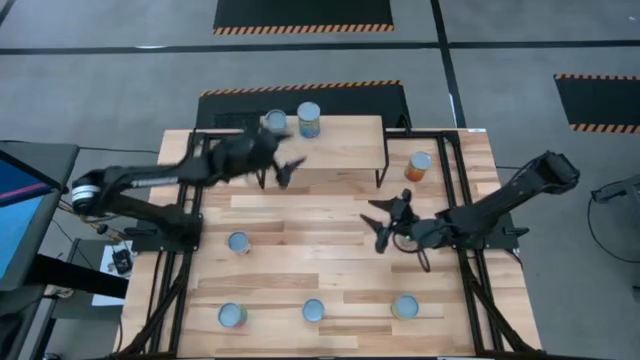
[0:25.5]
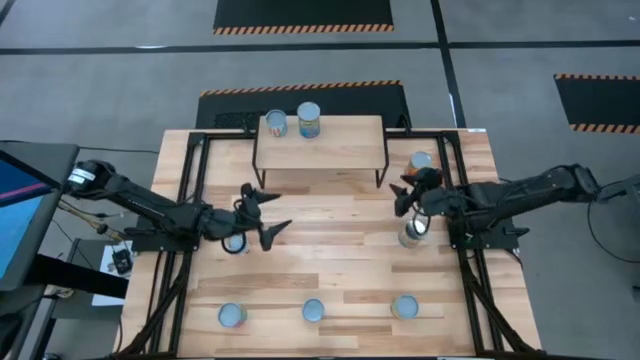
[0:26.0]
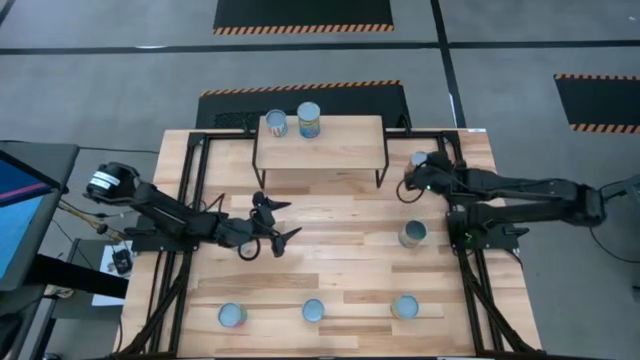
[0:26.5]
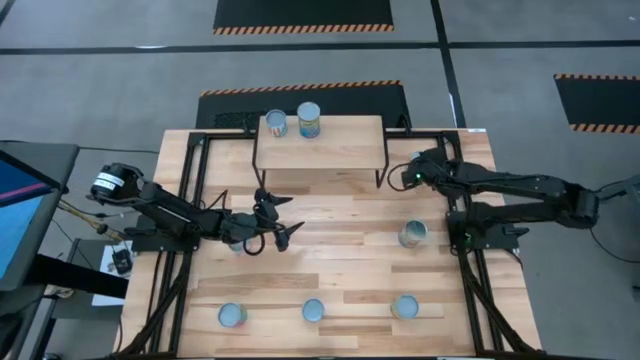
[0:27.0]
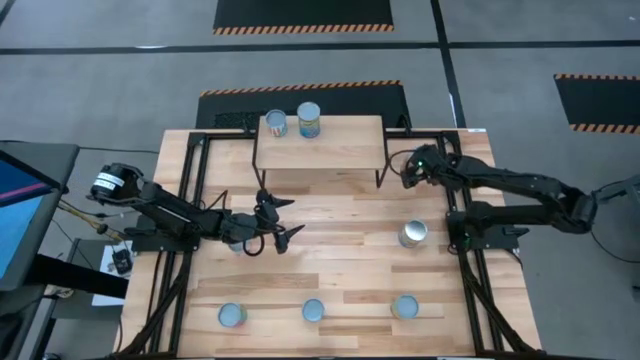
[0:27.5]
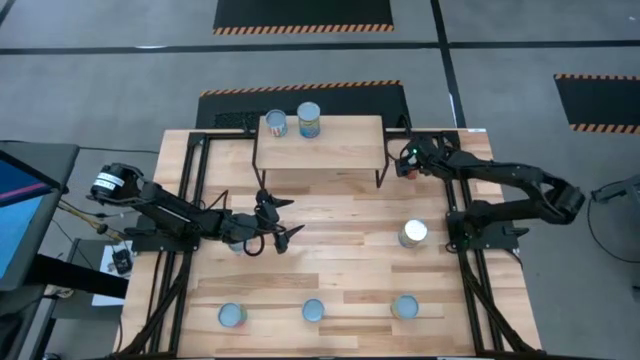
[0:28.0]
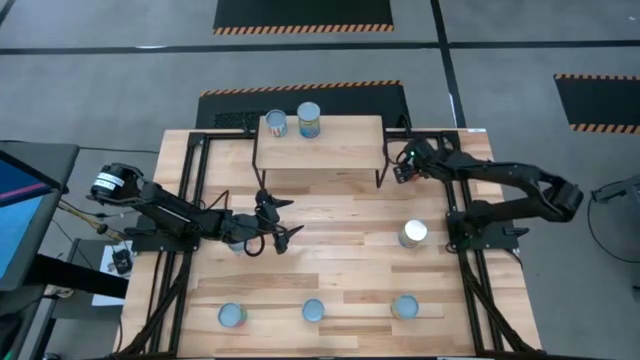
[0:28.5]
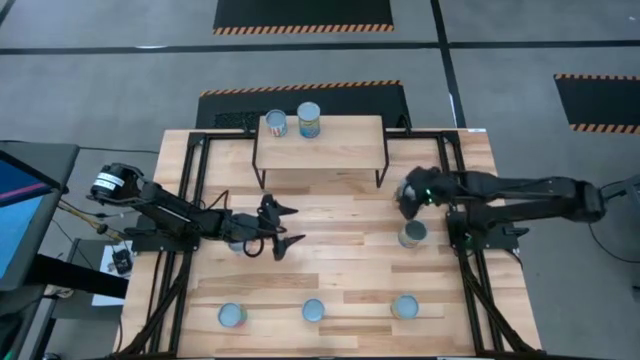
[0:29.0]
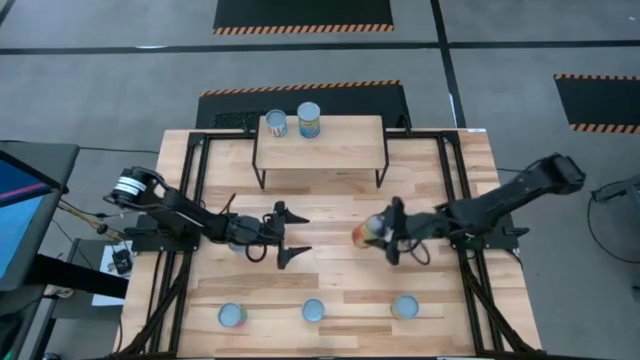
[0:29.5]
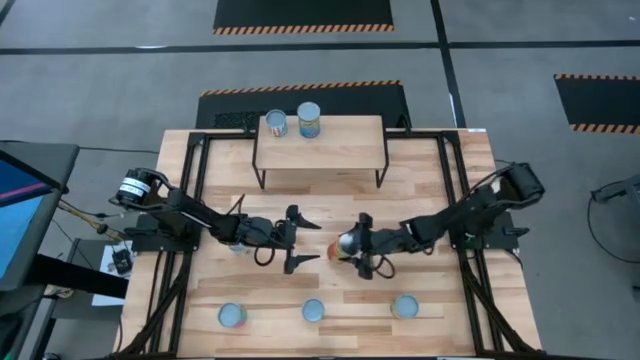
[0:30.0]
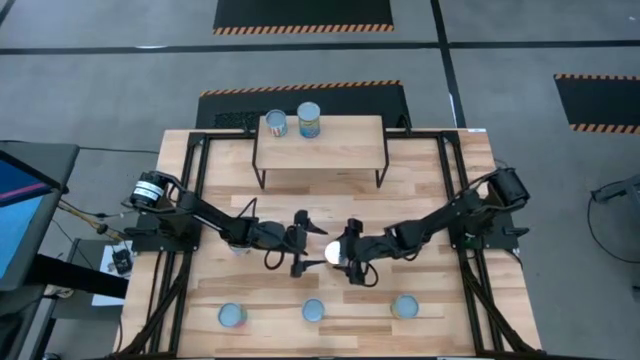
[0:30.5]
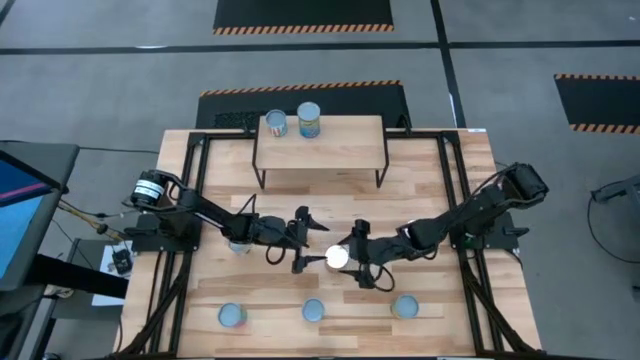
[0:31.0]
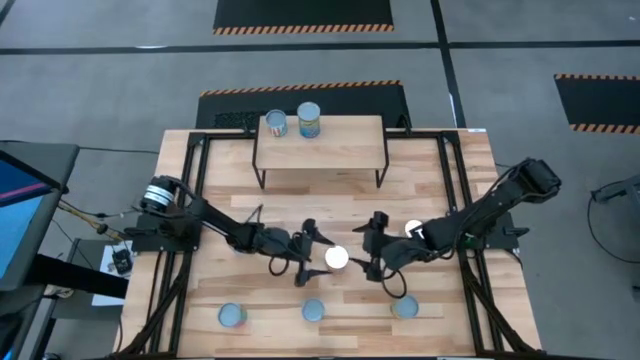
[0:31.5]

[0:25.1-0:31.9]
Task: Pick and place cans onto a shelf
Put the canned pineapple on the shelf

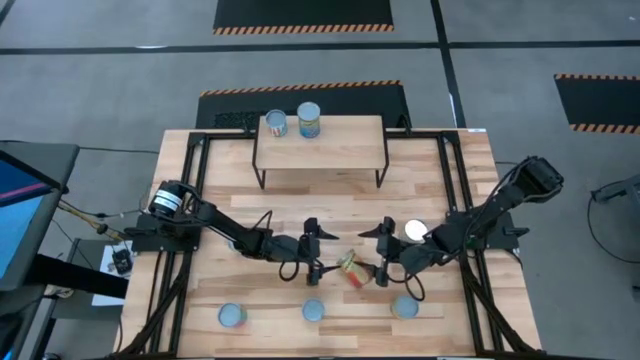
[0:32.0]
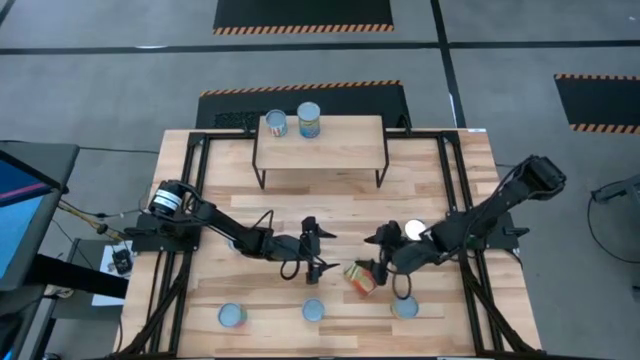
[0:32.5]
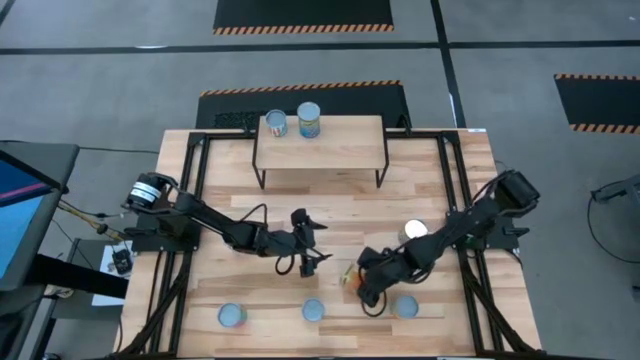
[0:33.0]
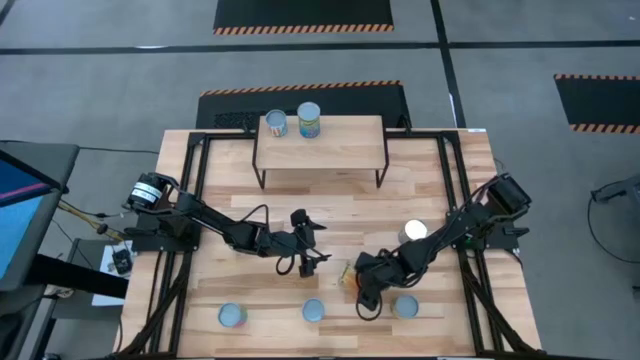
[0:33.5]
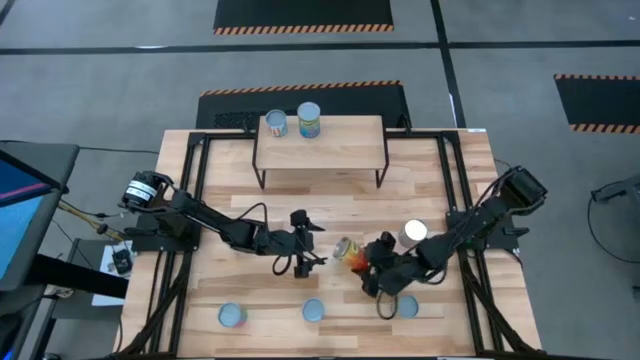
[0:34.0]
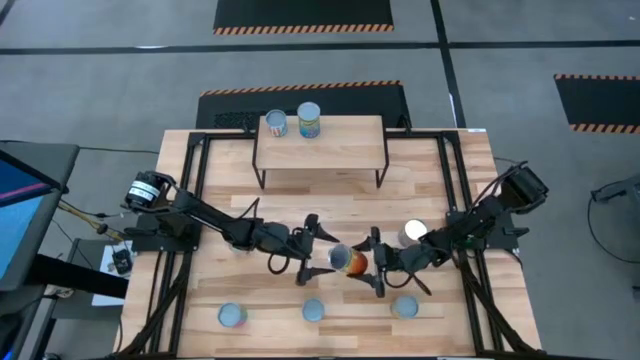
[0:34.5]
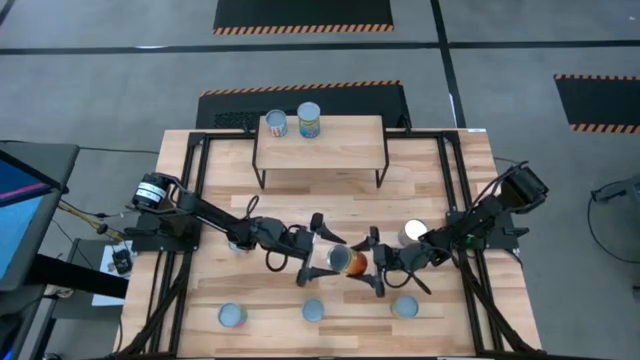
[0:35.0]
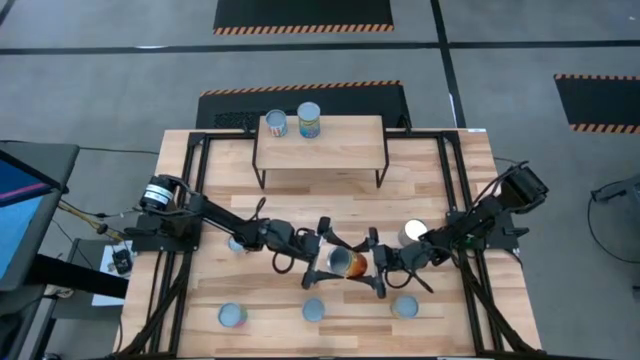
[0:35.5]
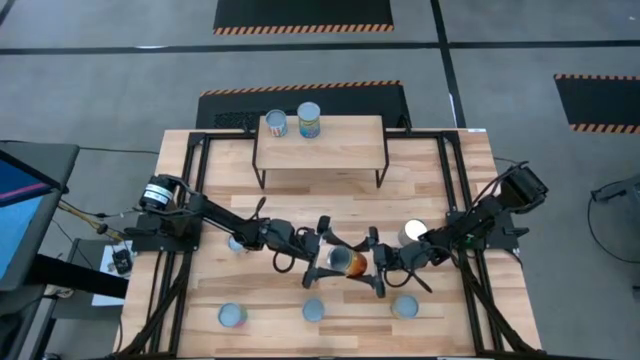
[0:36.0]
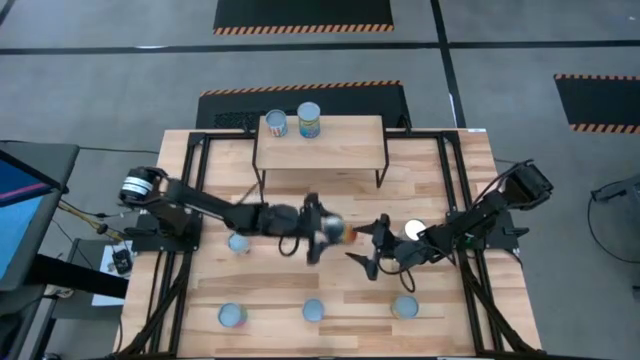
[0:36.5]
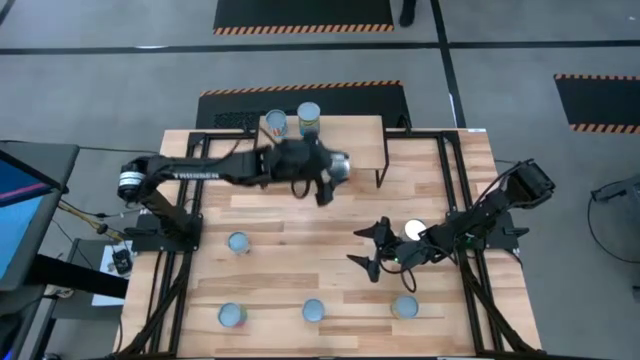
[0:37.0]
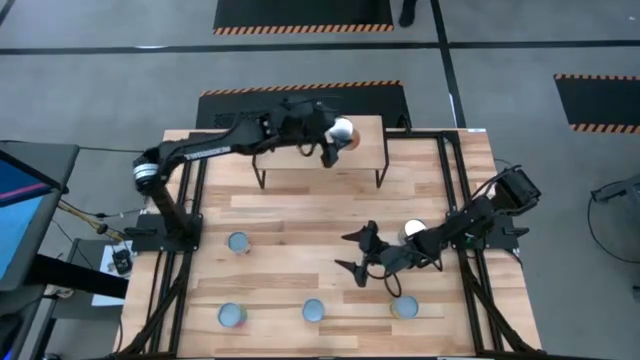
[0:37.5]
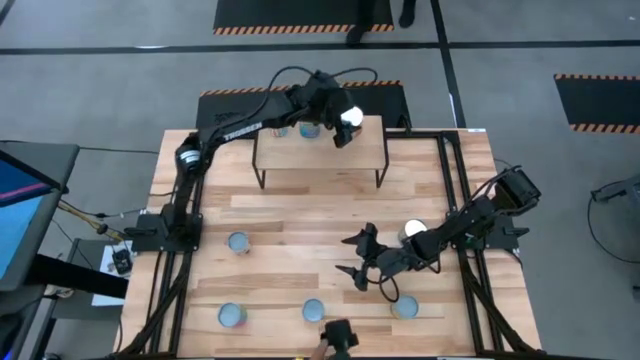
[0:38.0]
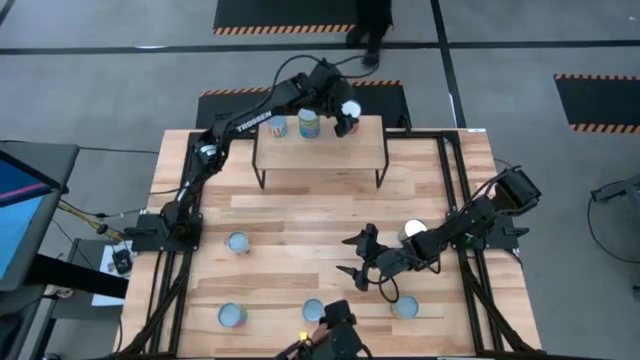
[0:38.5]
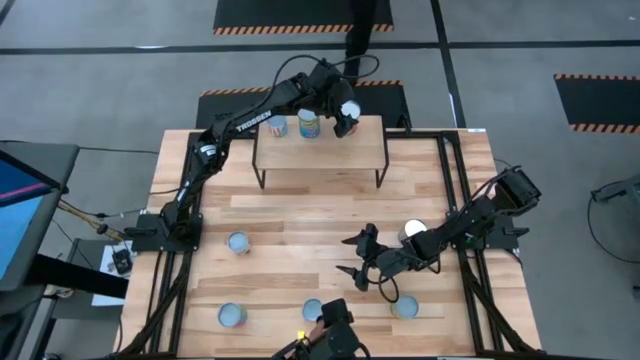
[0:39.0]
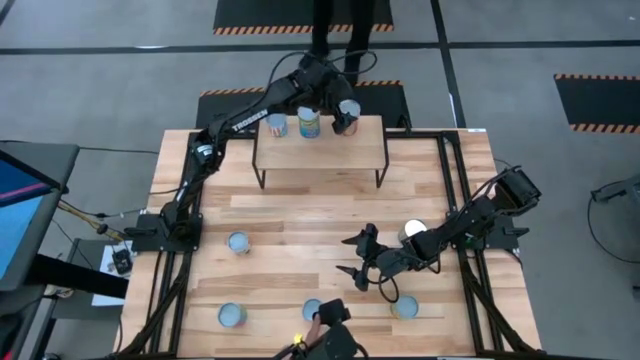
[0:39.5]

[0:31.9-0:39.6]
Put the canned pineapple on the shelf

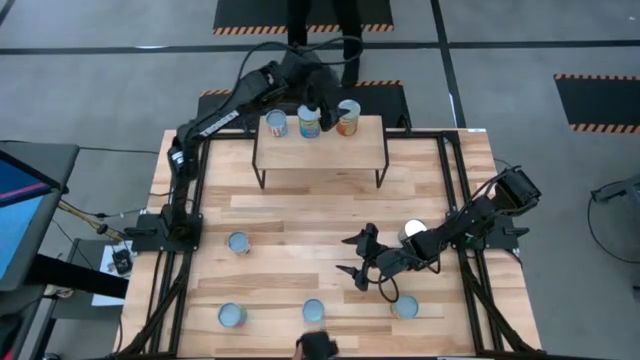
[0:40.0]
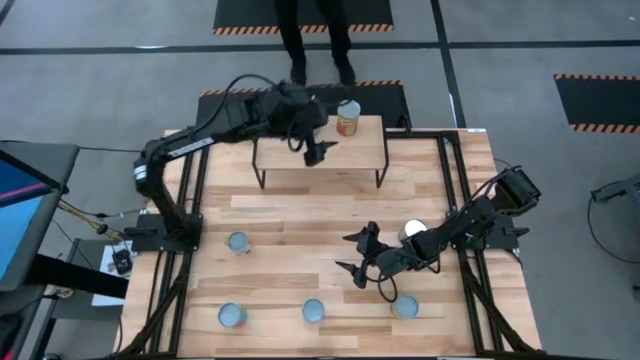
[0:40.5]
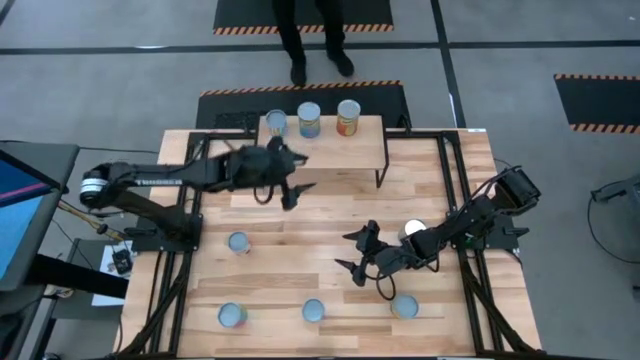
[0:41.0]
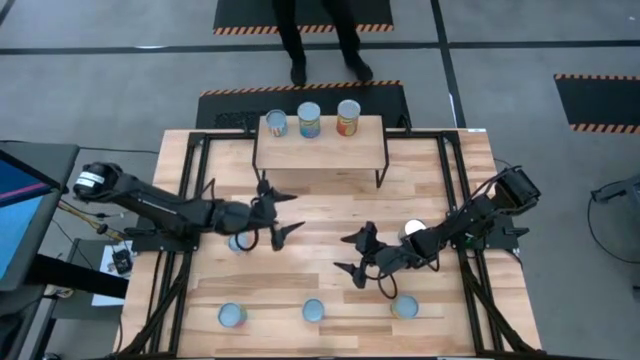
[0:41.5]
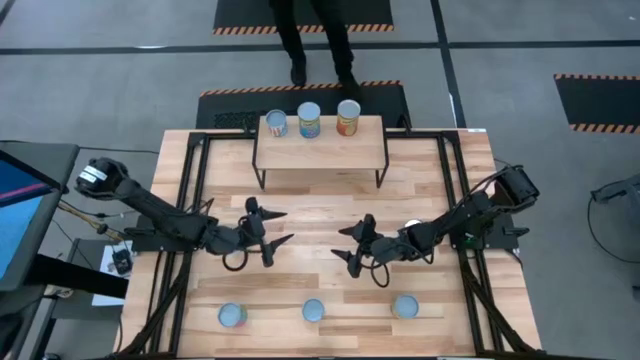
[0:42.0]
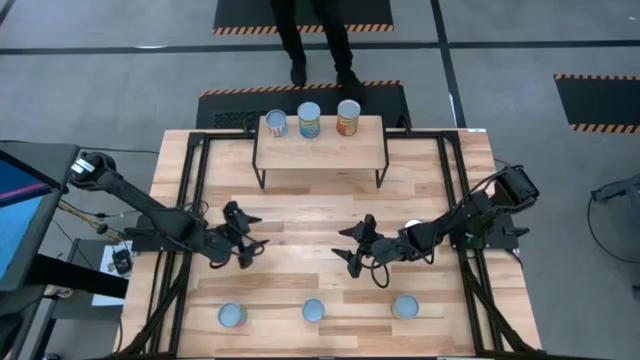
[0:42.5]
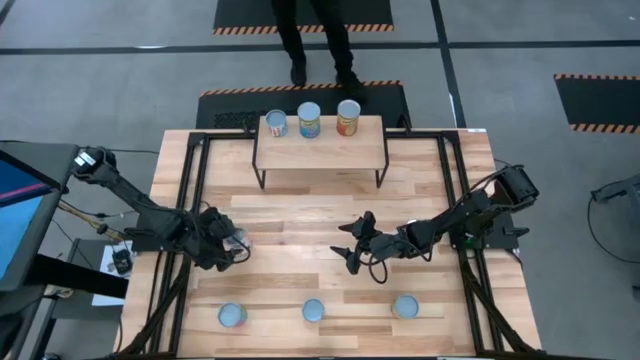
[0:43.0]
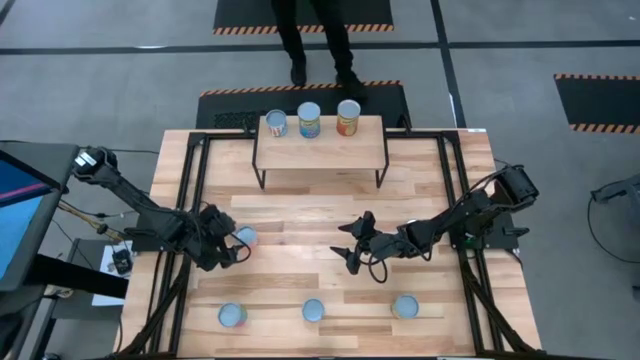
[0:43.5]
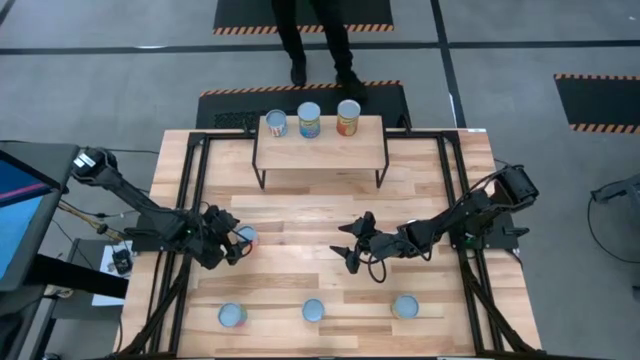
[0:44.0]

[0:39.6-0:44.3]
Put the canned meatballs on the shelf

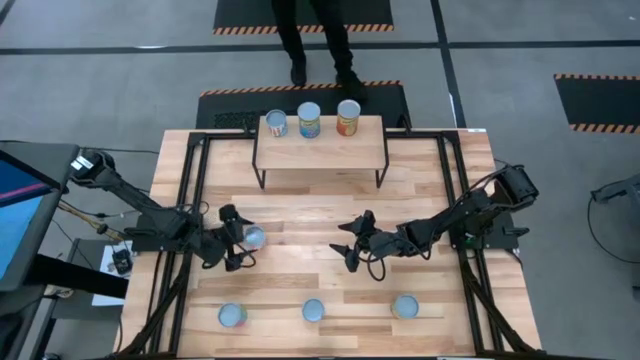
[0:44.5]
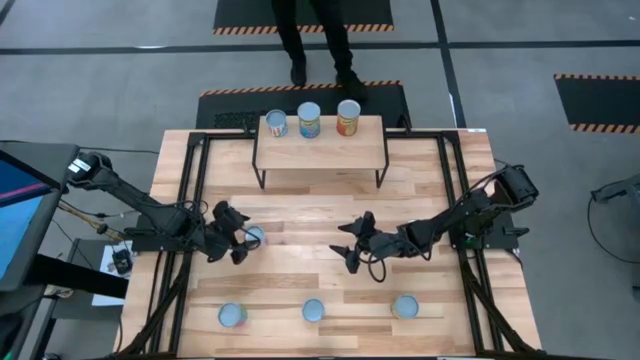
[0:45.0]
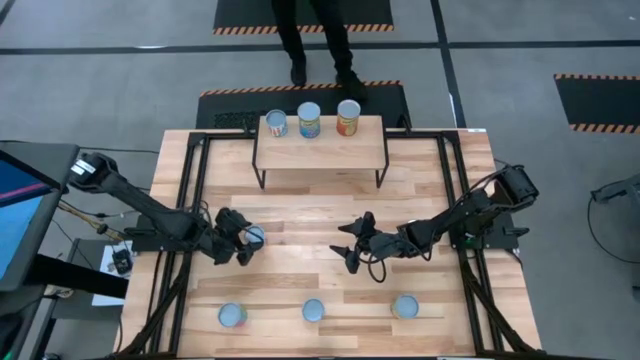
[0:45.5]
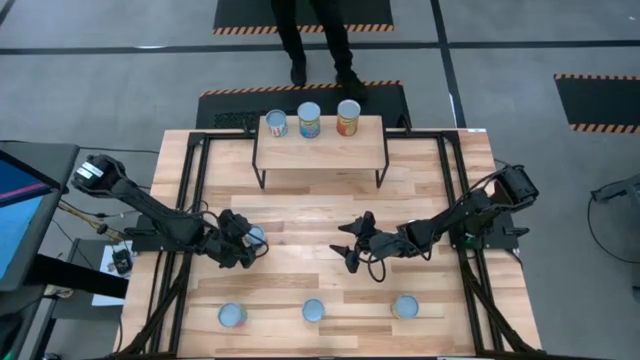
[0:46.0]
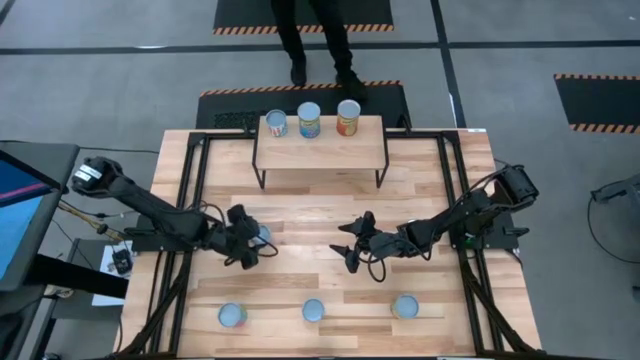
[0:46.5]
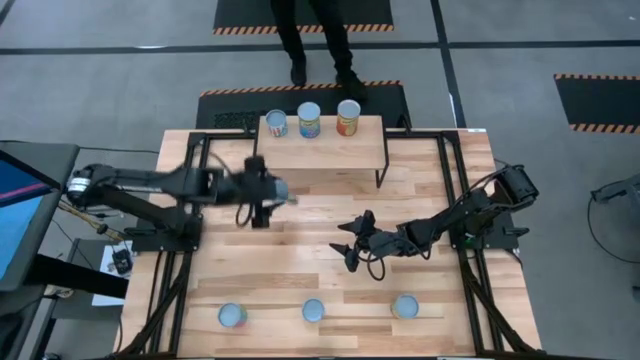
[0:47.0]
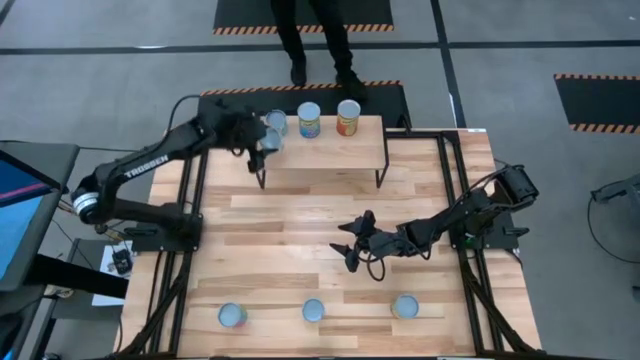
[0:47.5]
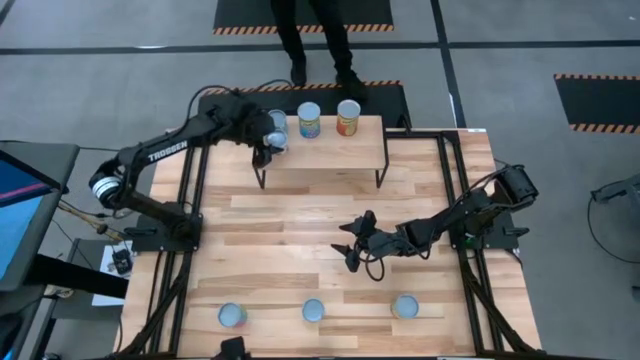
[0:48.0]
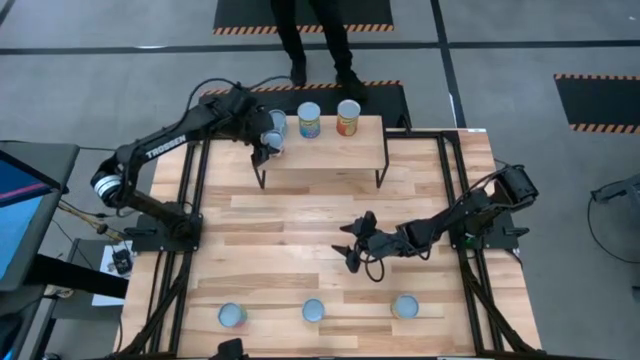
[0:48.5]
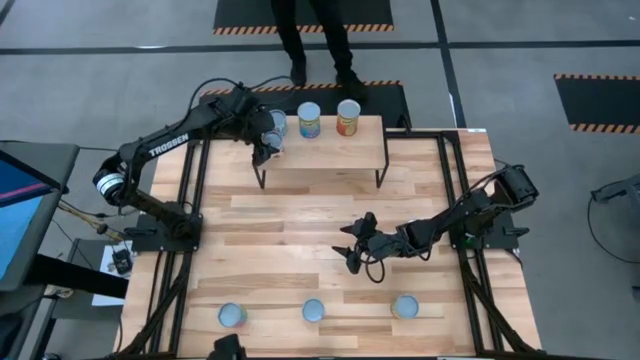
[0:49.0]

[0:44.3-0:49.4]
Put the canned meatballs on the shelf
